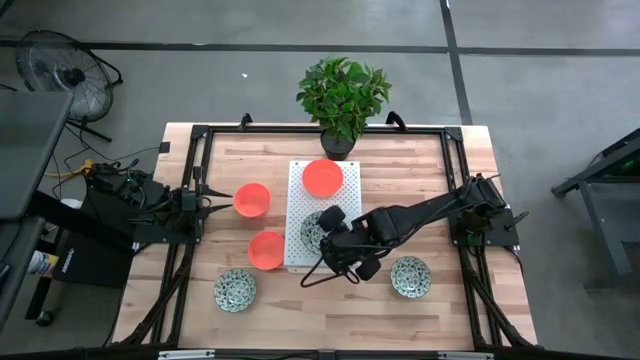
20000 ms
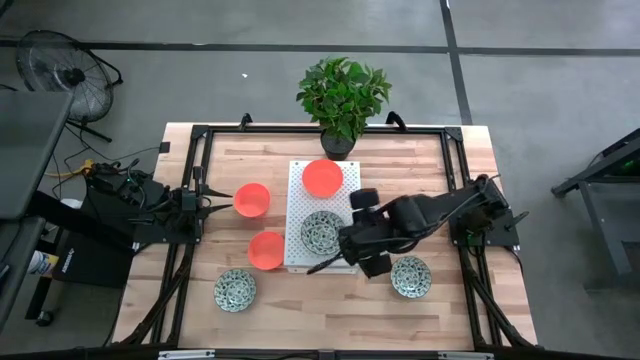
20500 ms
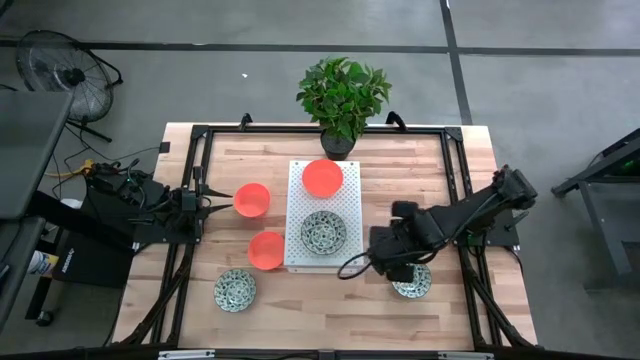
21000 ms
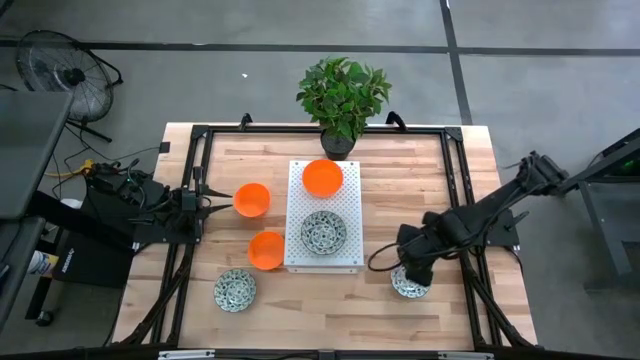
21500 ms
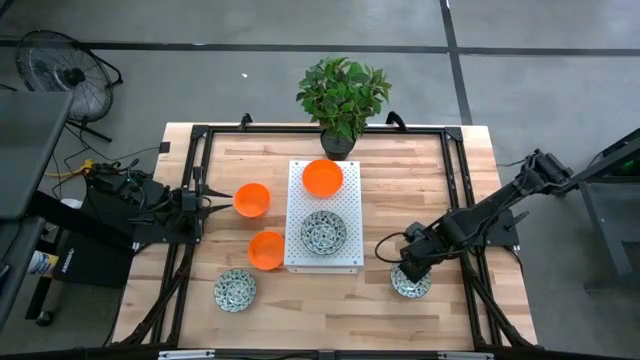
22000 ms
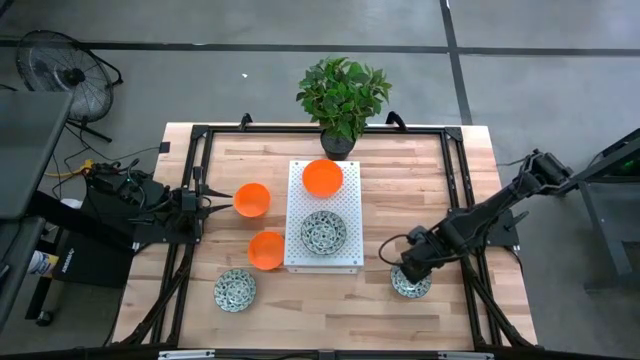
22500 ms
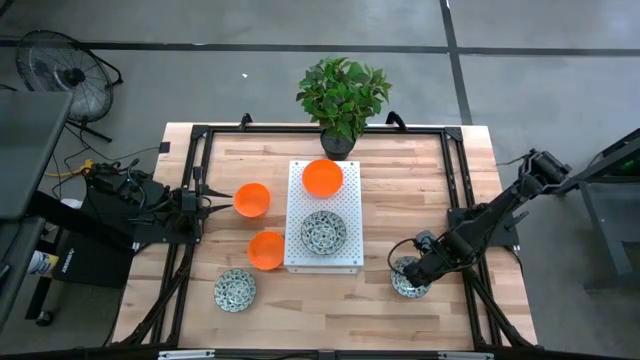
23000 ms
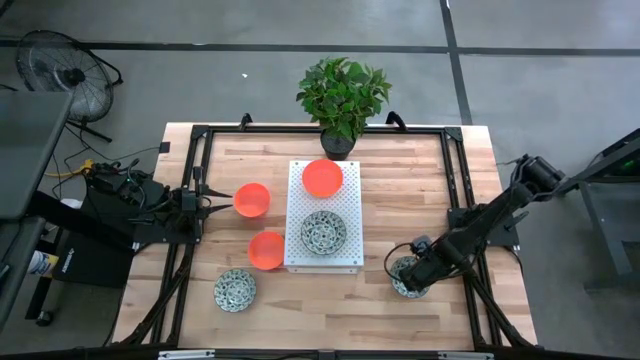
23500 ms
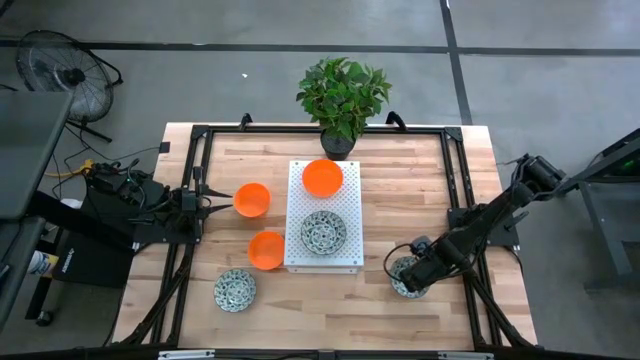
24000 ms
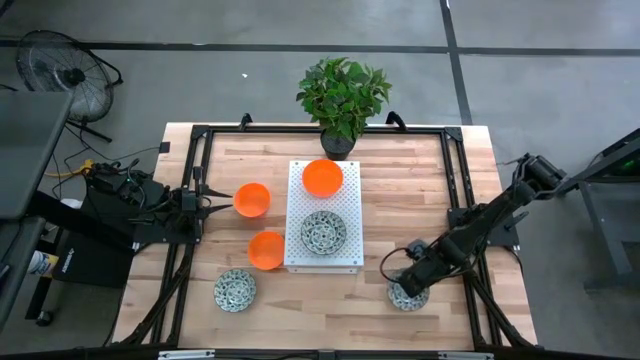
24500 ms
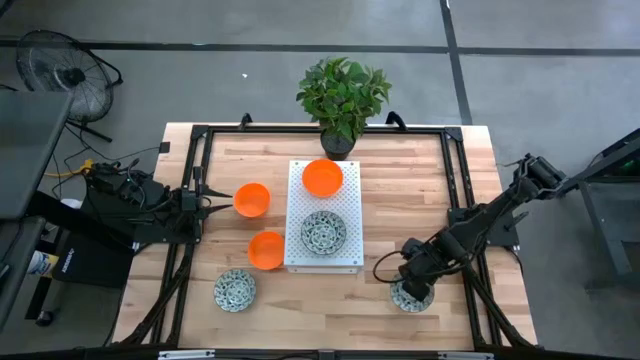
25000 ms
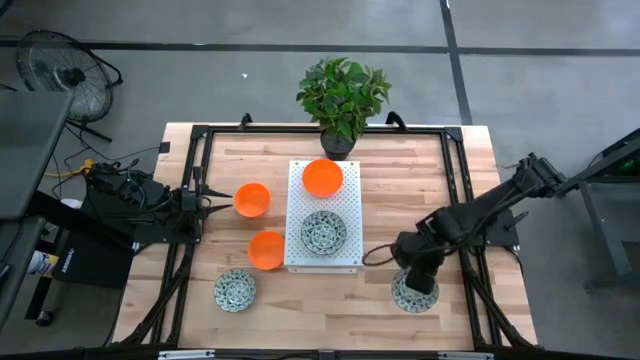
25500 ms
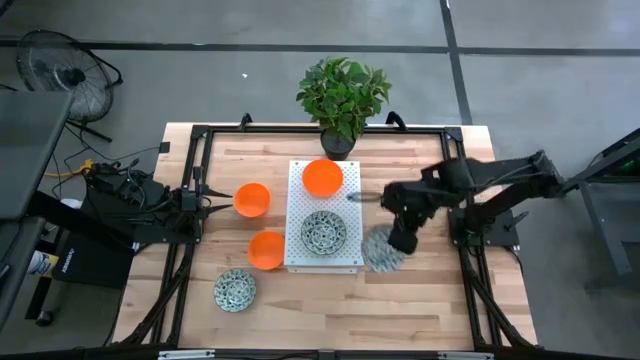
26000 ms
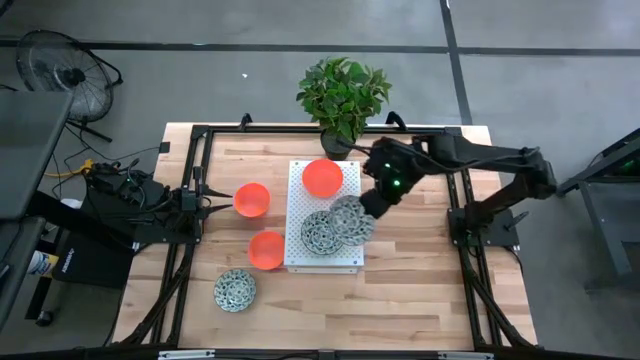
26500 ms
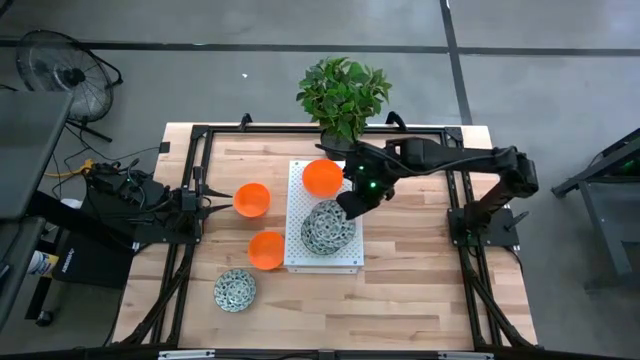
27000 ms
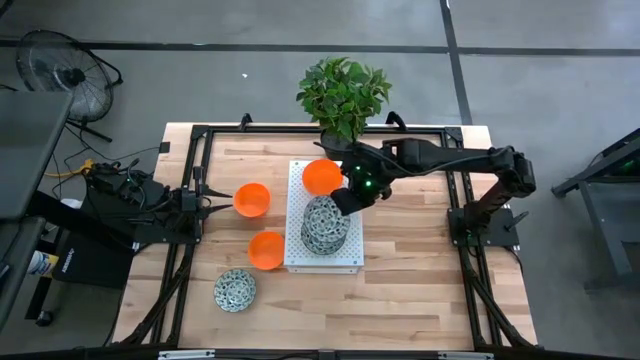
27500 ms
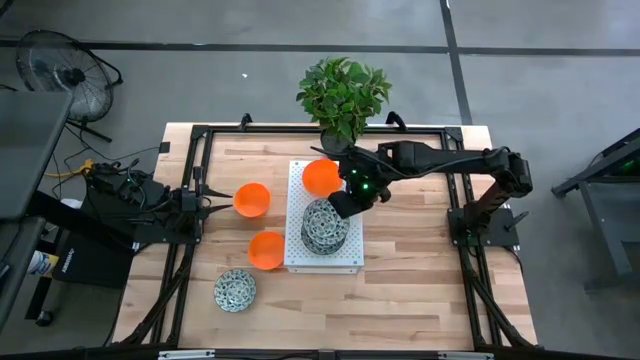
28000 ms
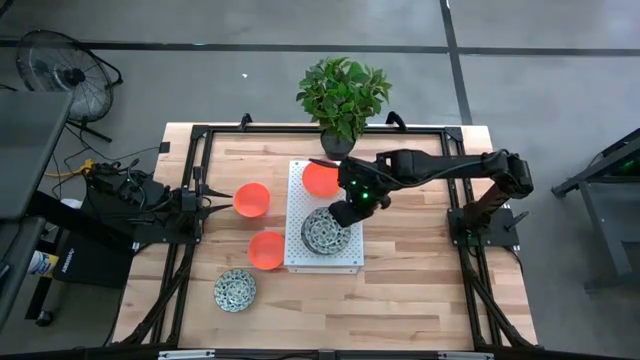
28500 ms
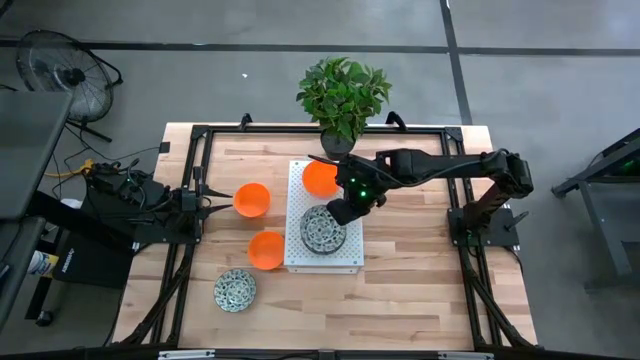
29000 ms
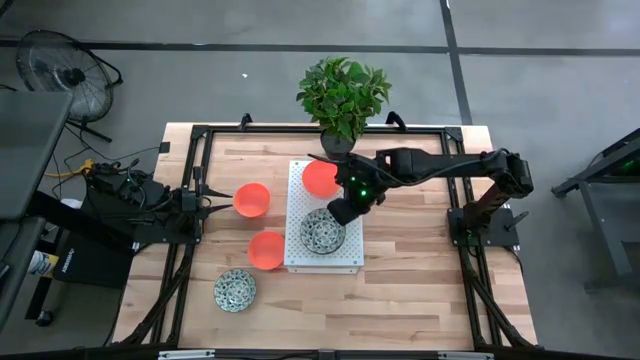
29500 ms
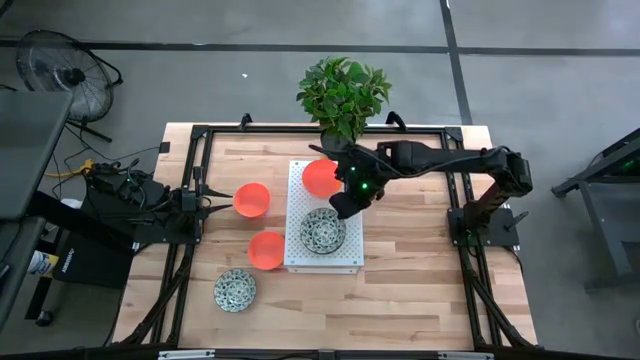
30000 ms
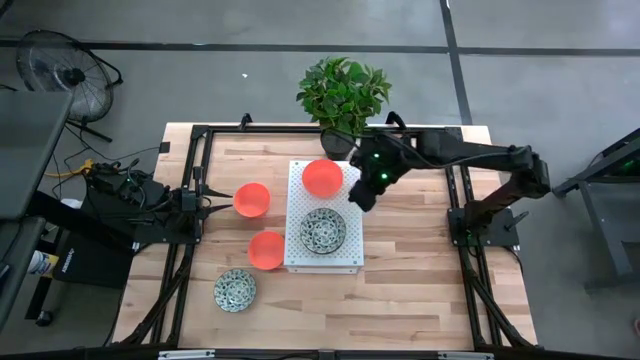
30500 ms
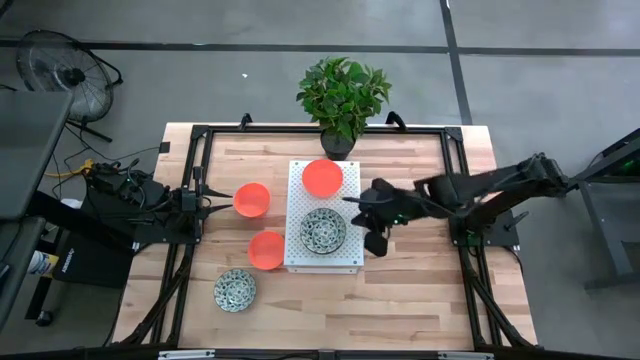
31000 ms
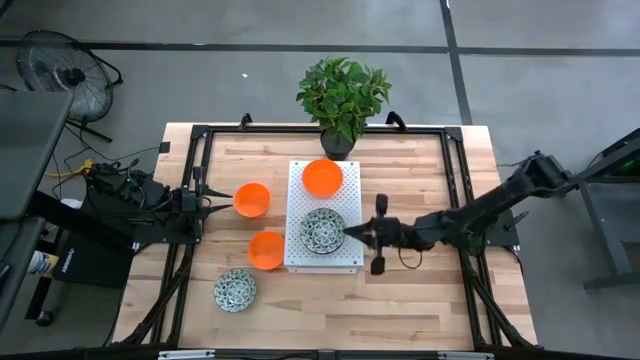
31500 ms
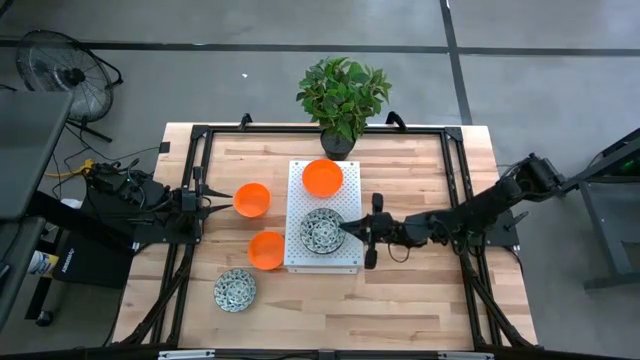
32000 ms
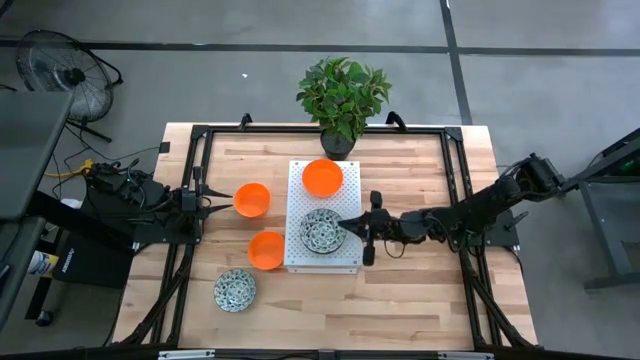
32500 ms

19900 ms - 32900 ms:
Task: Pick & Place Mini bowls
Stack the right green white bowl on top of the green white bowl on the shelf

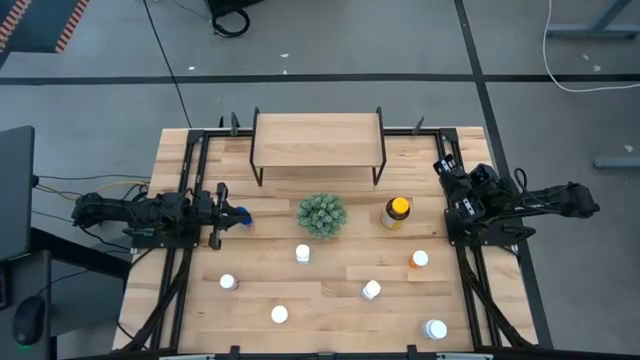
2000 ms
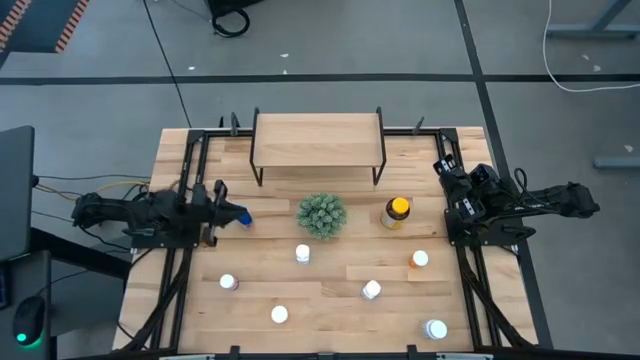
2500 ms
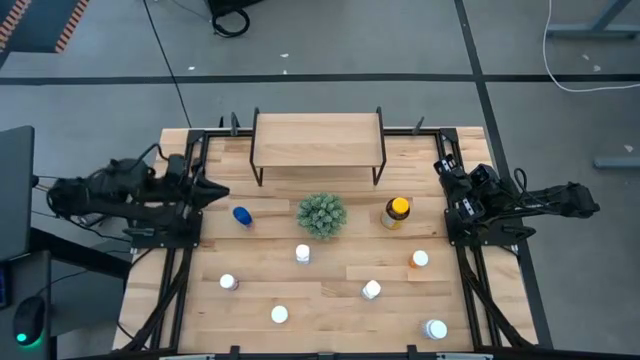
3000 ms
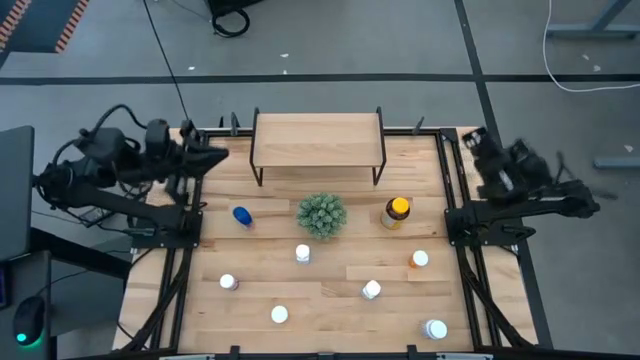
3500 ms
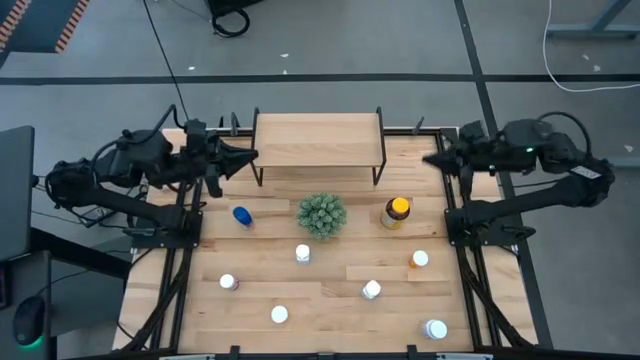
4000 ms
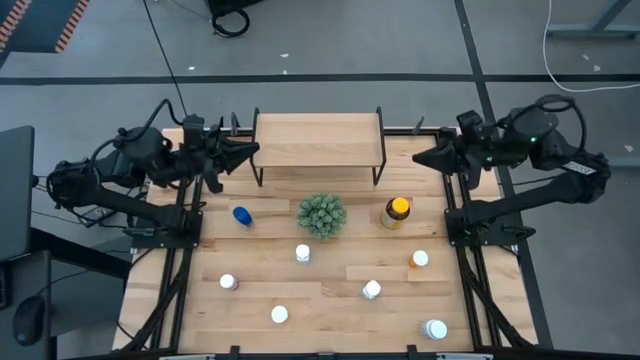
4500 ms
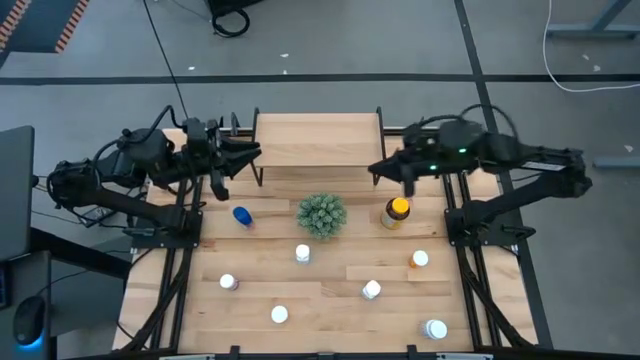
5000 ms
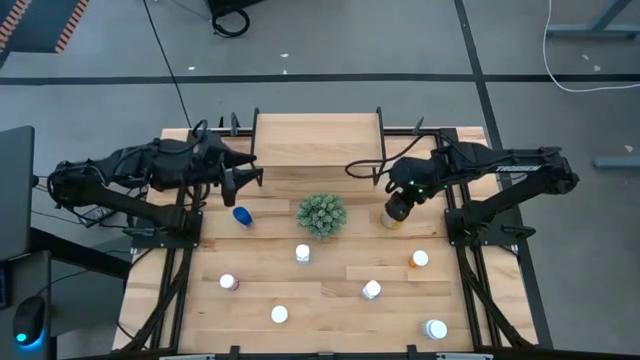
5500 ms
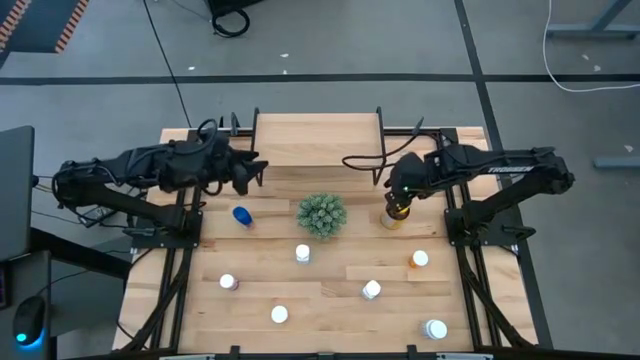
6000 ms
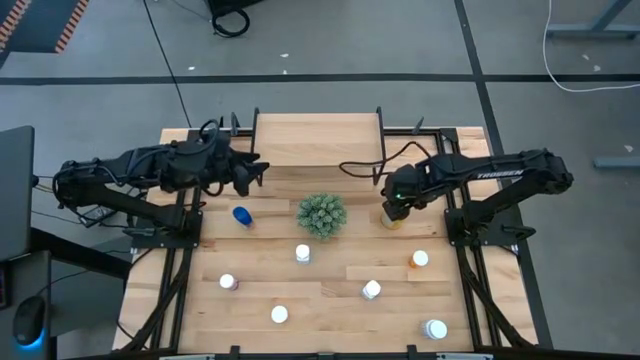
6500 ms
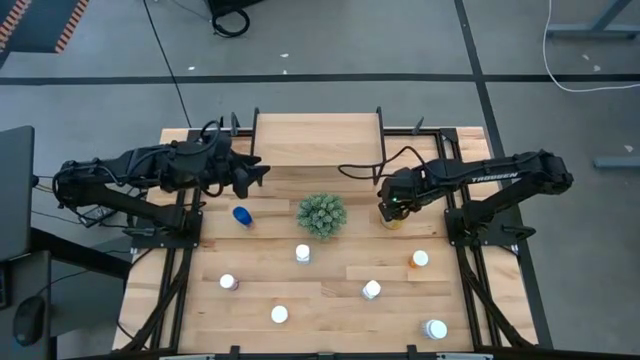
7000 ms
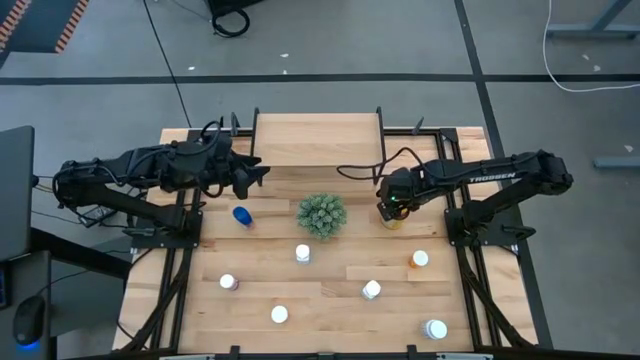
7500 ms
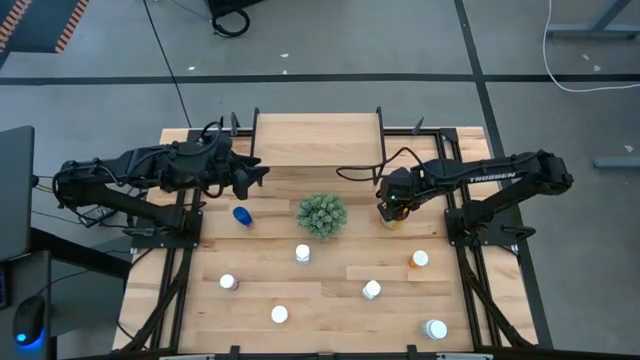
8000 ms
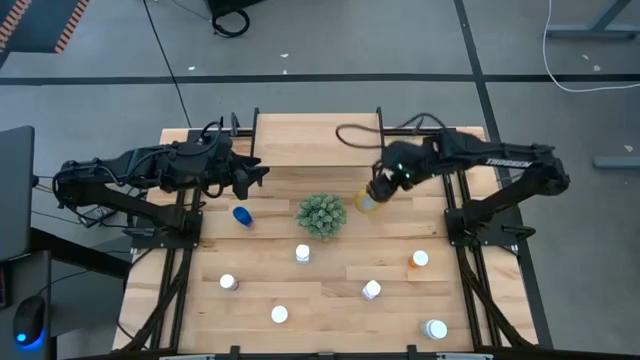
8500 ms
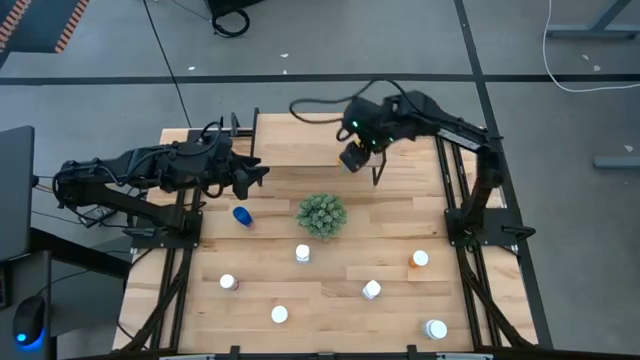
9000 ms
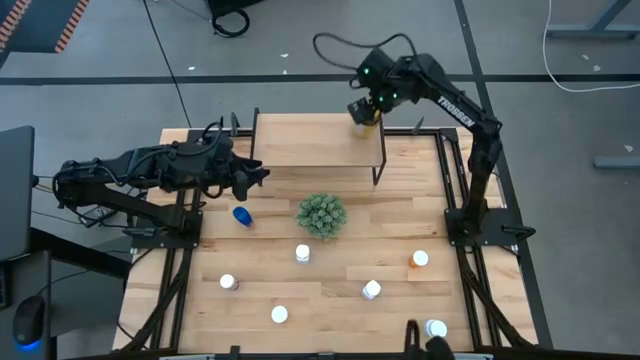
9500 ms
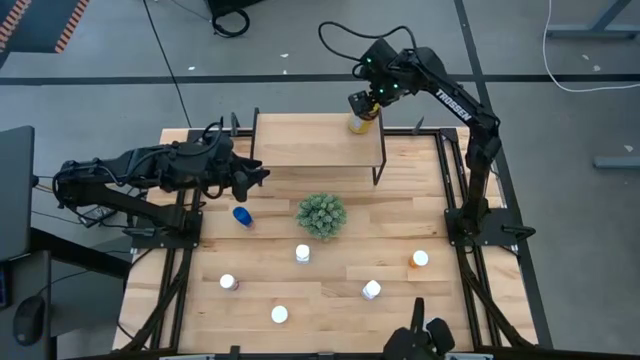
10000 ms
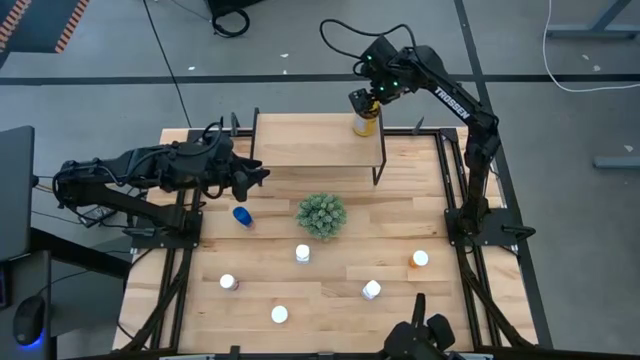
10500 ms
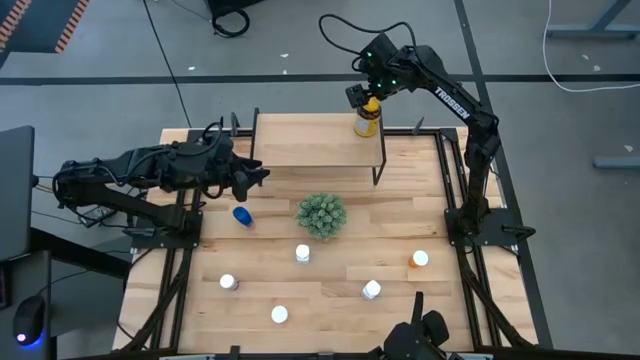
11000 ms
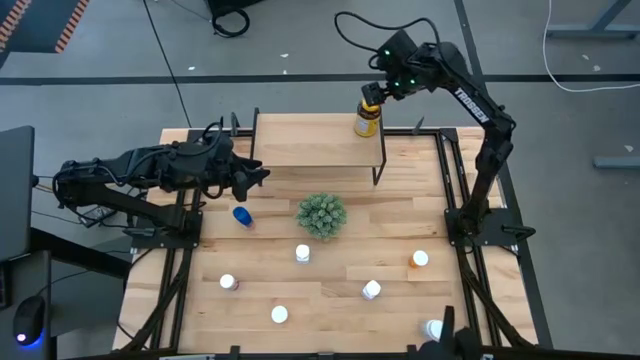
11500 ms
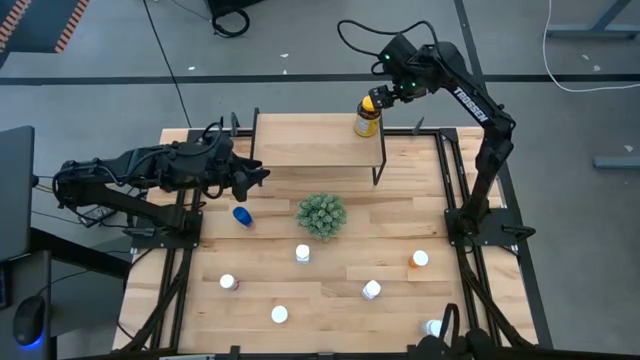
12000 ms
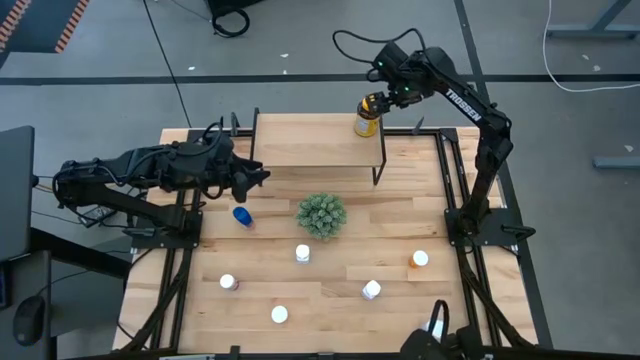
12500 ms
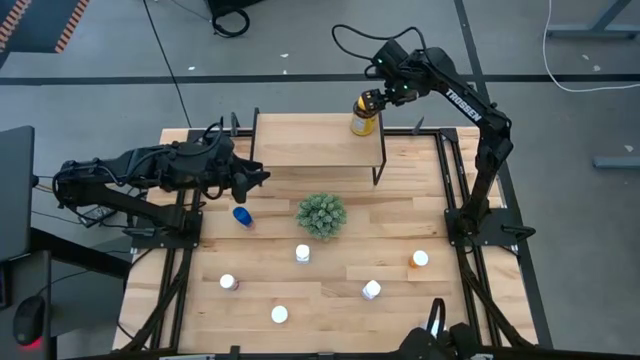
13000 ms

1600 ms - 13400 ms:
Task: Pick and place medicine bottles onto shelf by color
Put the yellow medicine bottle on the shelf
